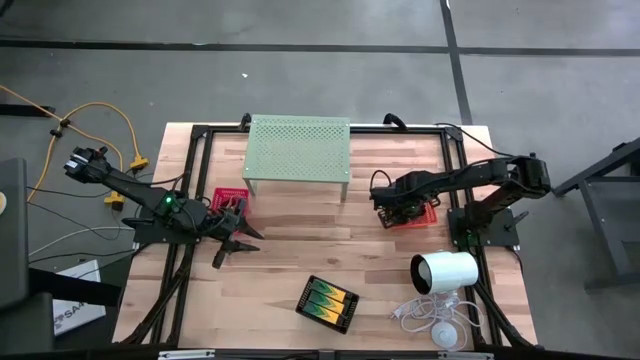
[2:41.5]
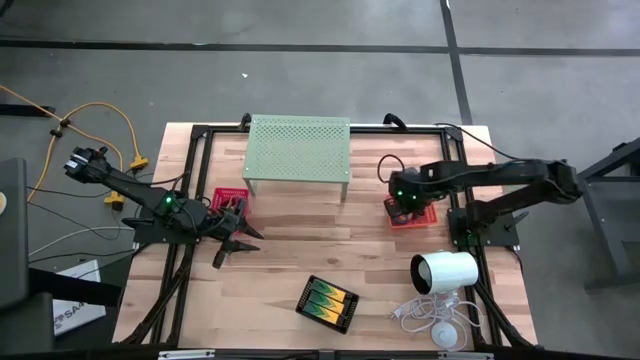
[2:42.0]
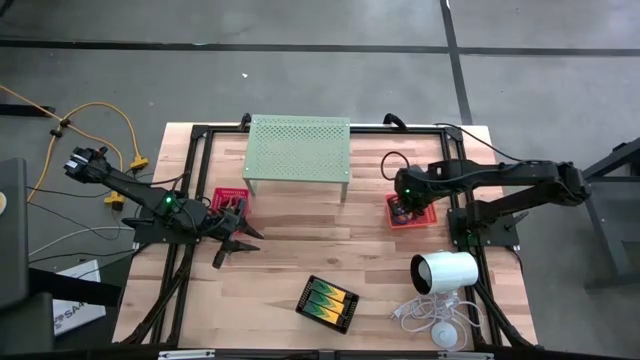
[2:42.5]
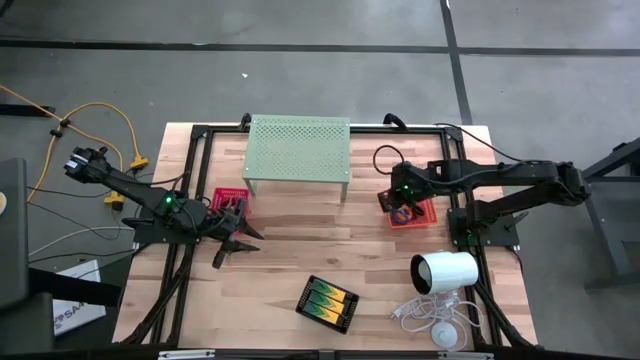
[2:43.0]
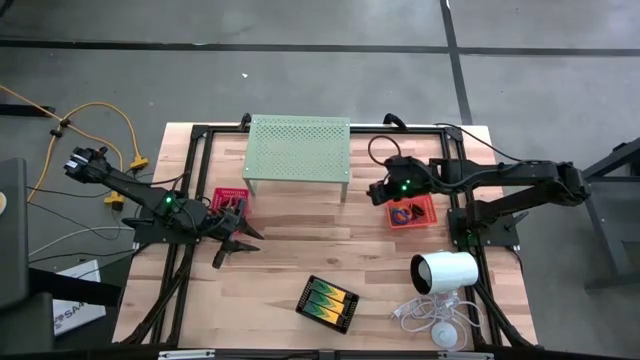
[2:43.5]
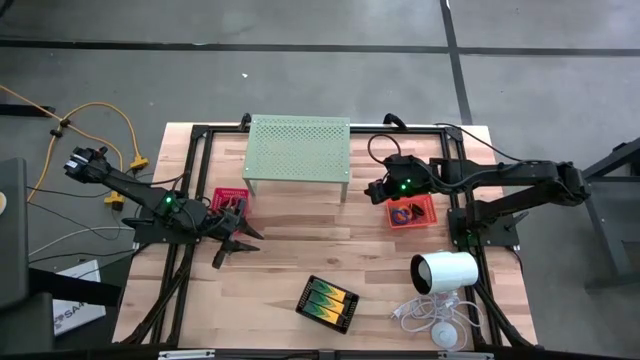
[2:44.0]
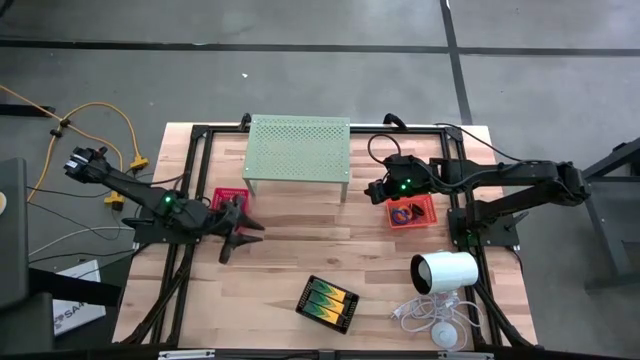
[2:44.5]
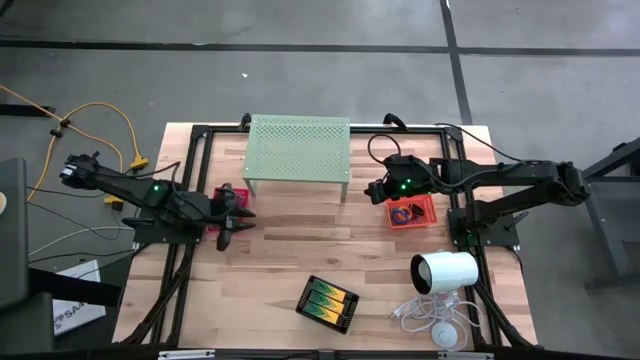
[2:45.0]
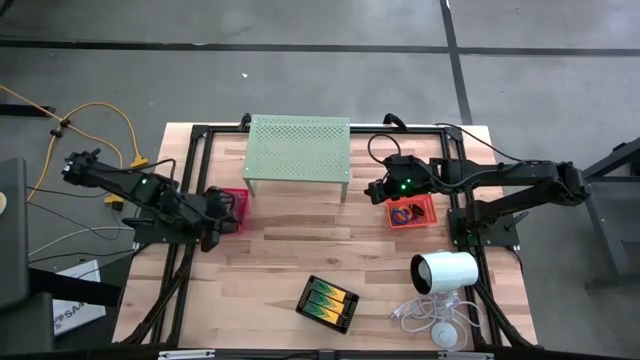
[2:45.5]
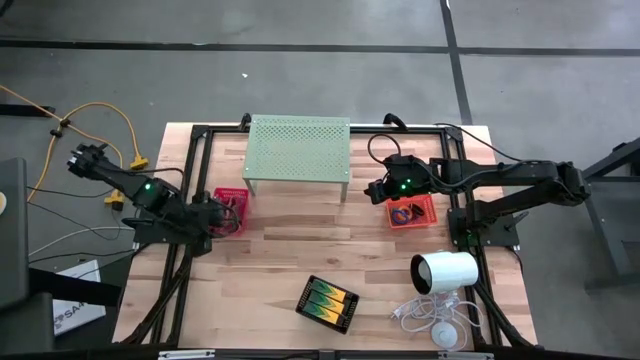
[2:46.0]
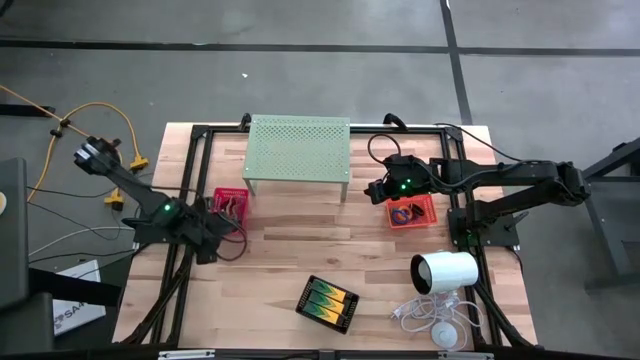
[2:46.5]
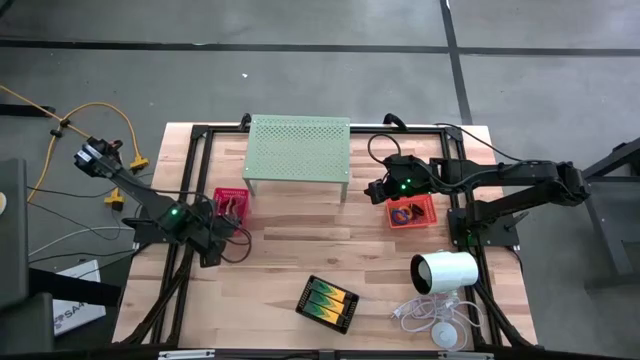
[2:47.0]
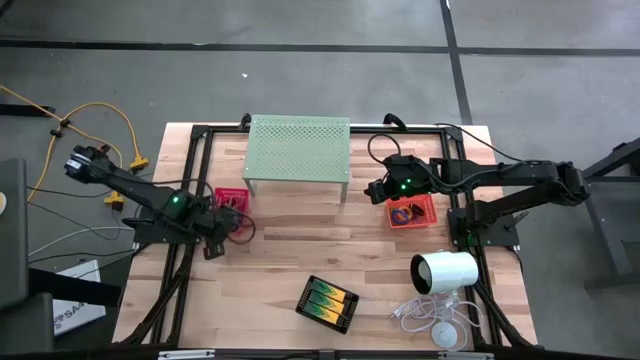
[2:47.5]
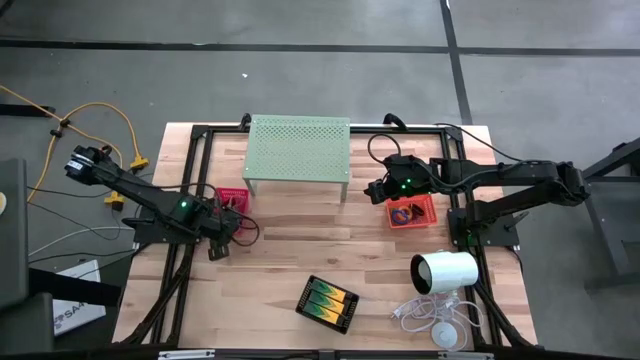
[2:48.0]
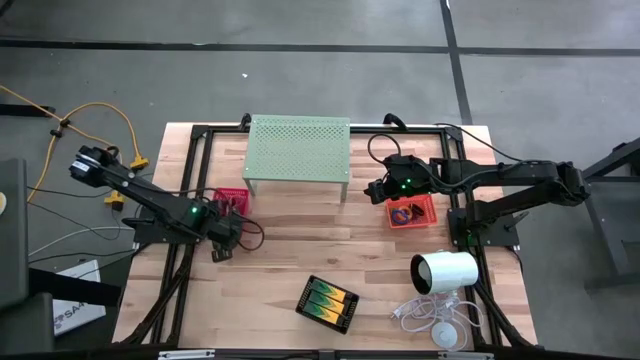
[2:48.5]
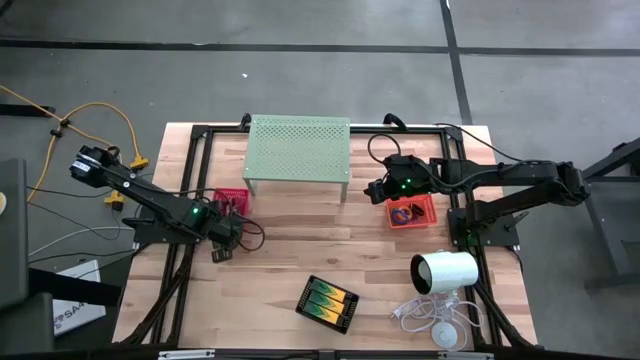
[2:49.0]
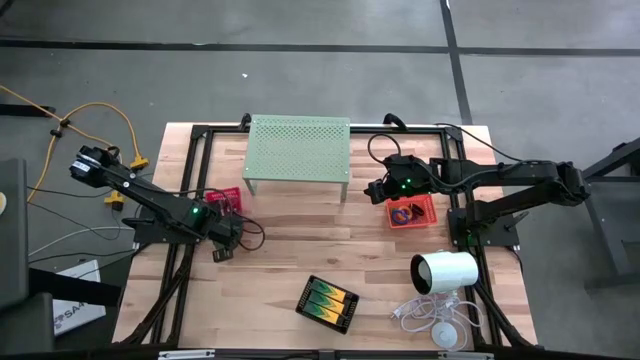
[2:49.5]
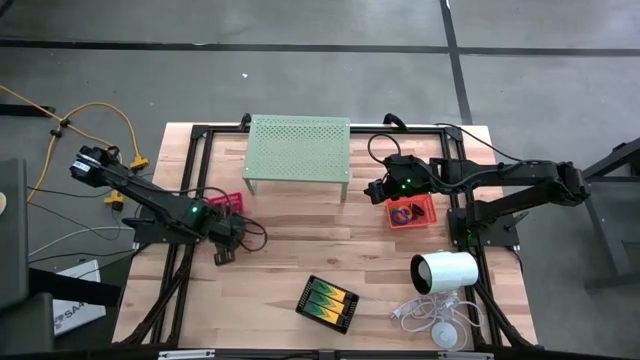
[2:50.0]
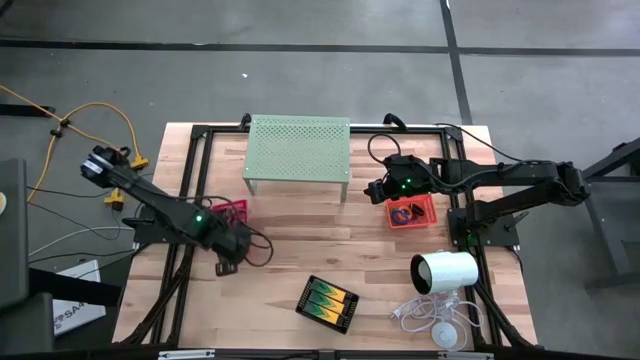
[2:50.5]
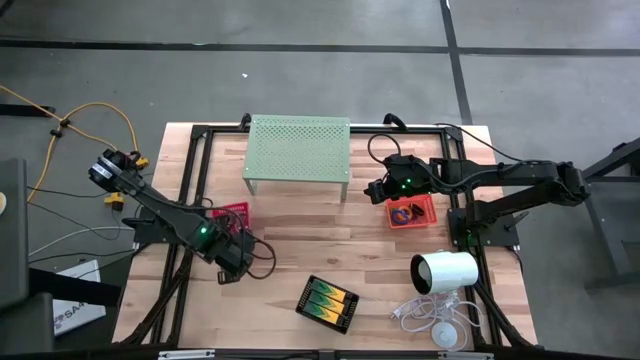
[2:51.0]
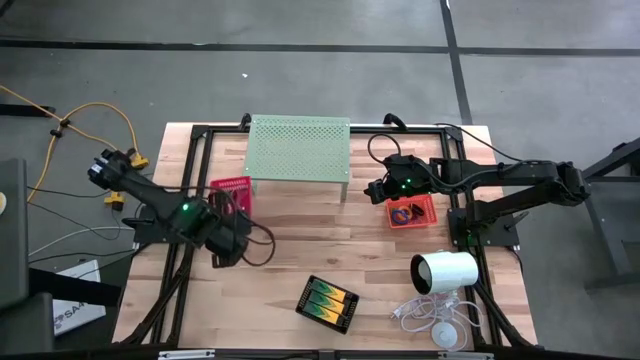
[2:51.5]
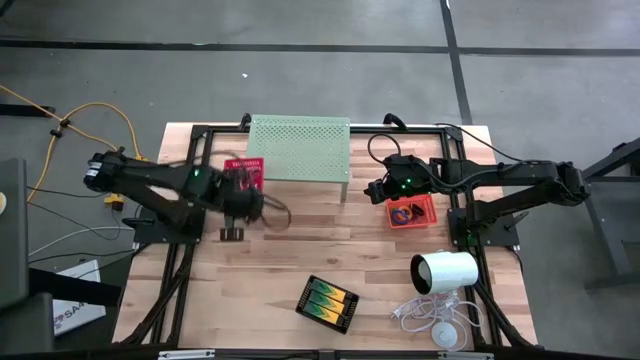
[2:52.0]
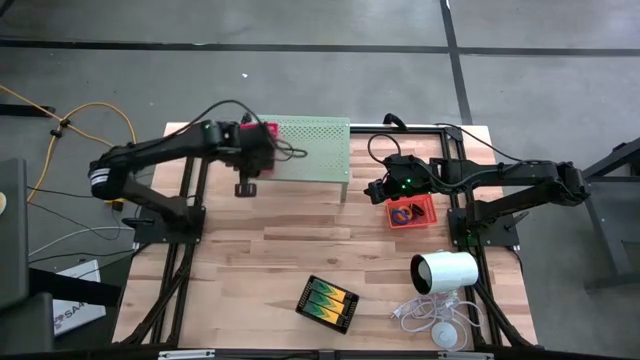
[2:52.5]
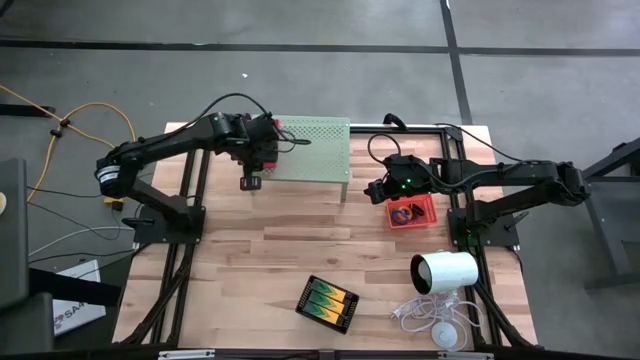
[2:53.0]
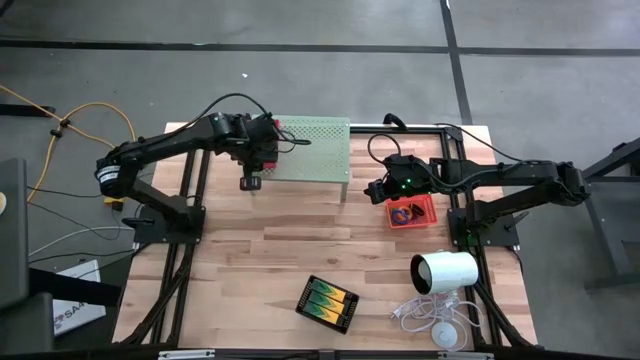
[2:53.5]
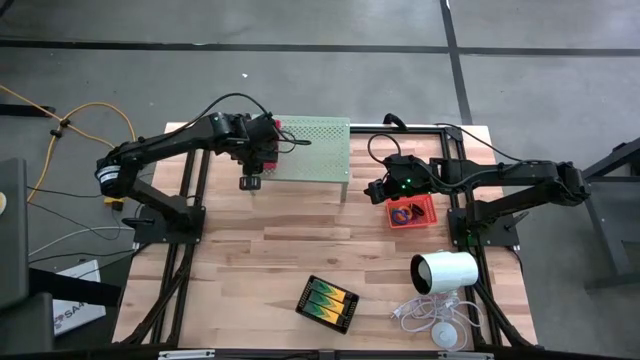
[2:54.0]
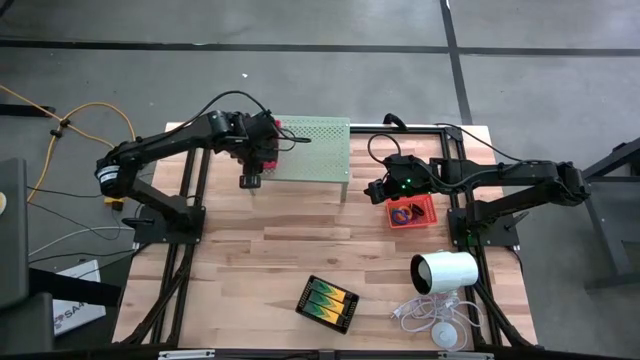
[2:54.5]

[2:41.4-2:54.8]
Task: Pick & Place Office Desk Supplies
Put the red bin on the shelf

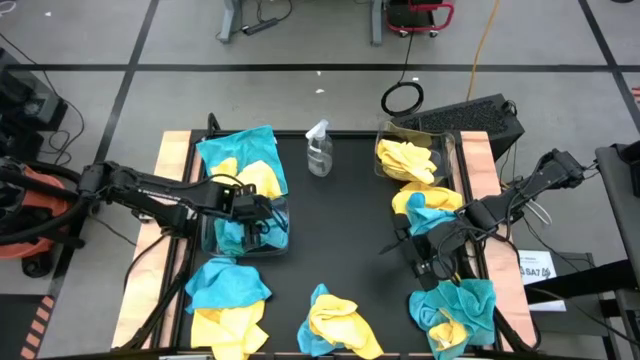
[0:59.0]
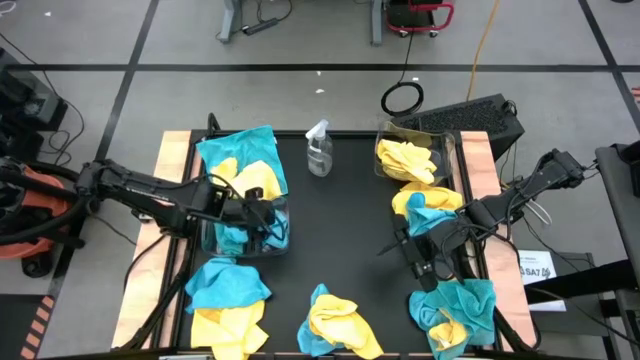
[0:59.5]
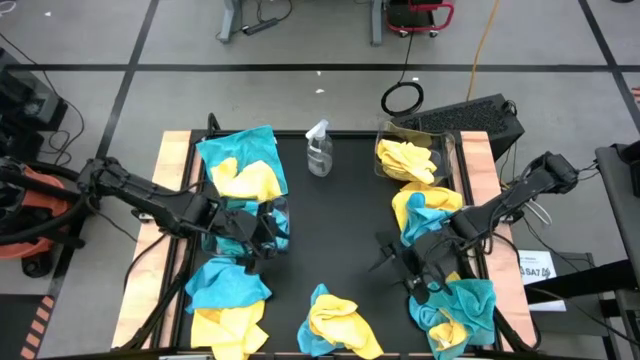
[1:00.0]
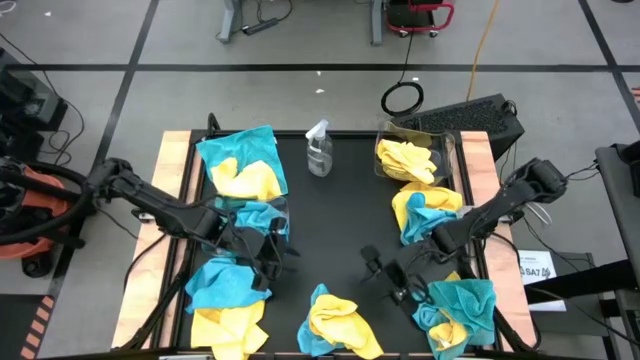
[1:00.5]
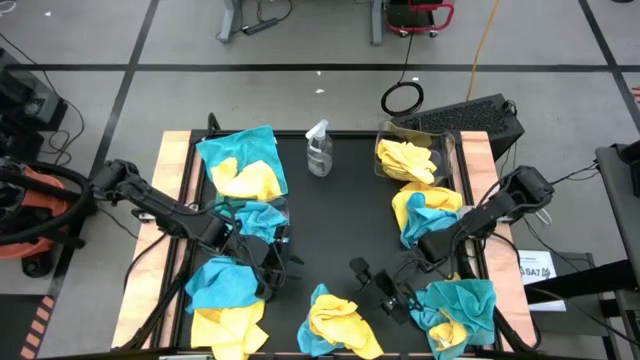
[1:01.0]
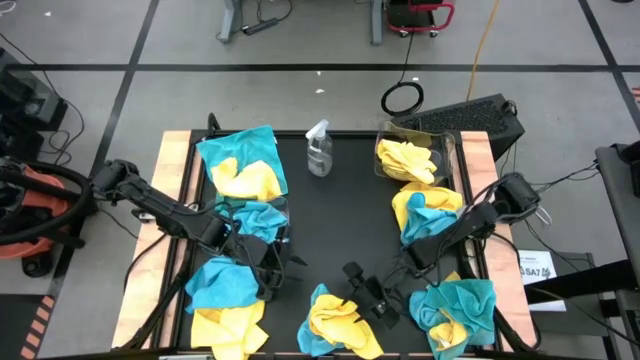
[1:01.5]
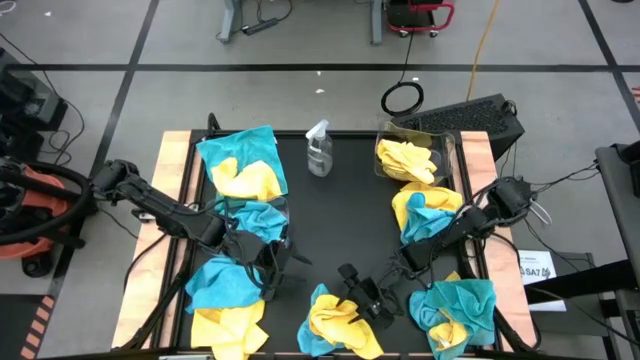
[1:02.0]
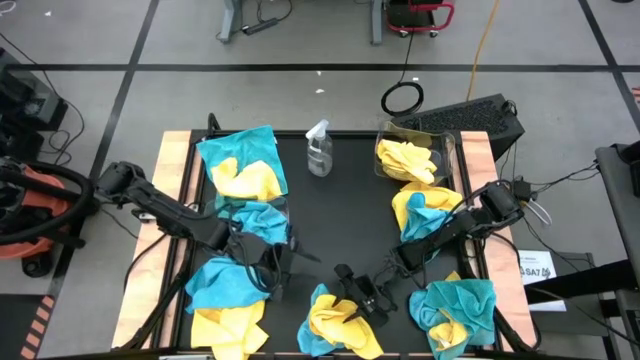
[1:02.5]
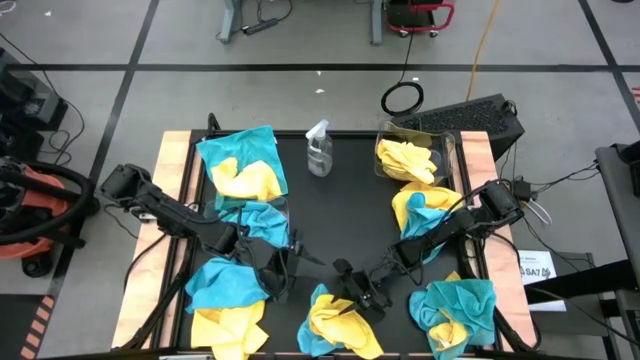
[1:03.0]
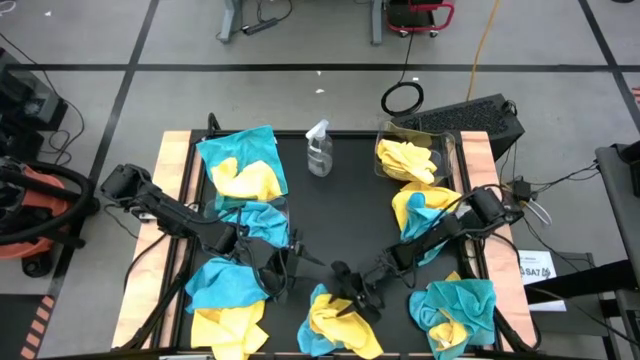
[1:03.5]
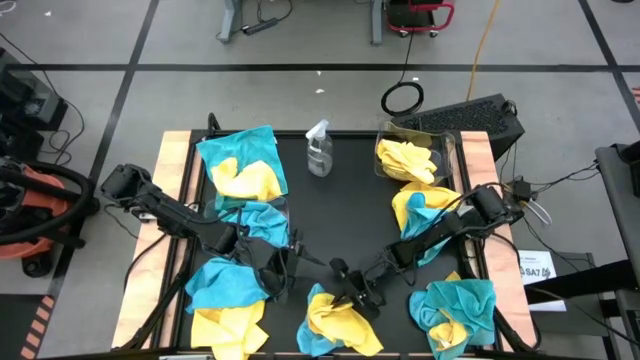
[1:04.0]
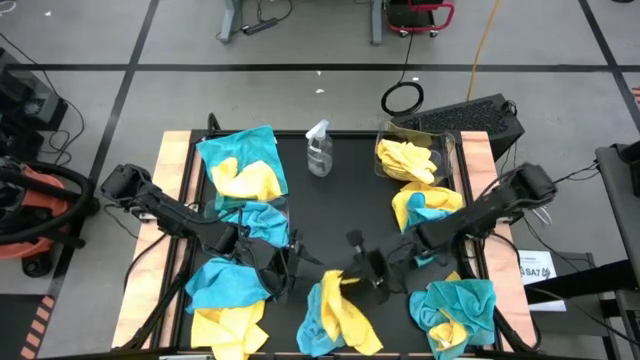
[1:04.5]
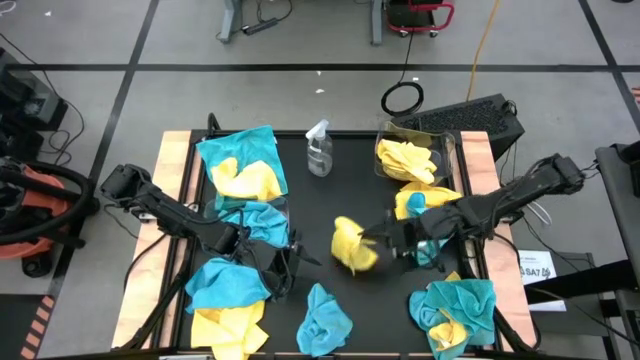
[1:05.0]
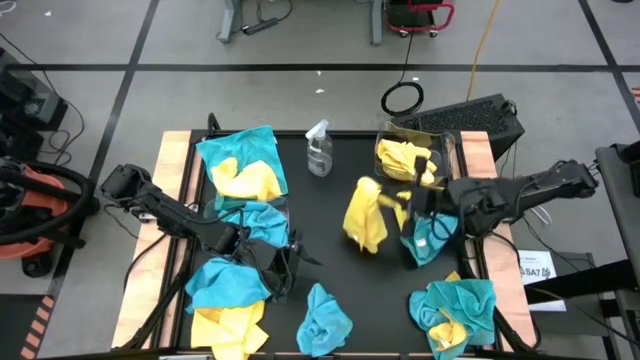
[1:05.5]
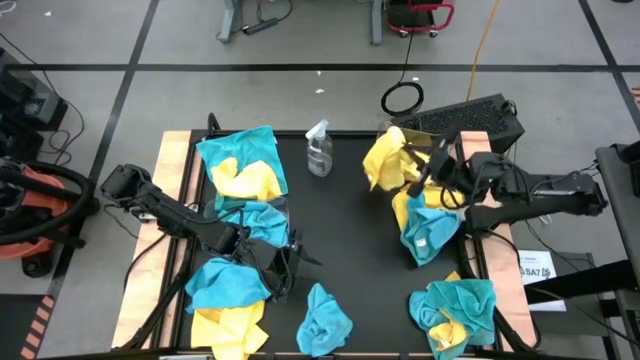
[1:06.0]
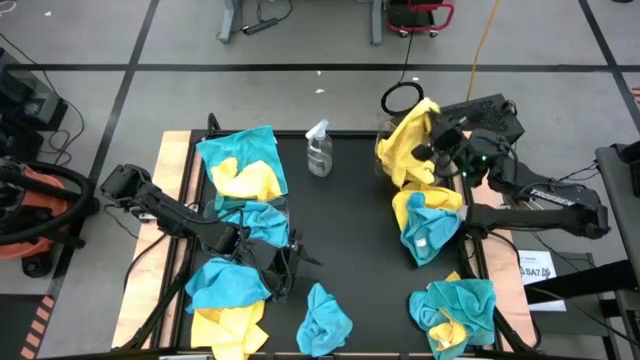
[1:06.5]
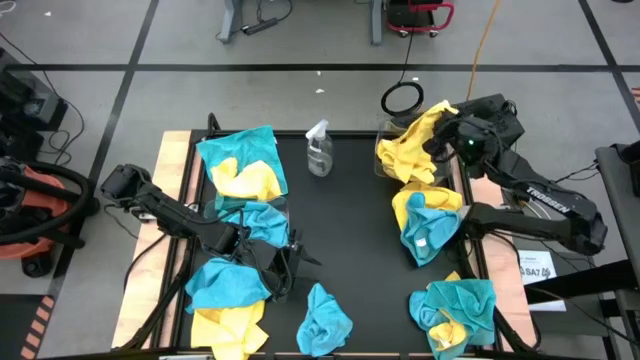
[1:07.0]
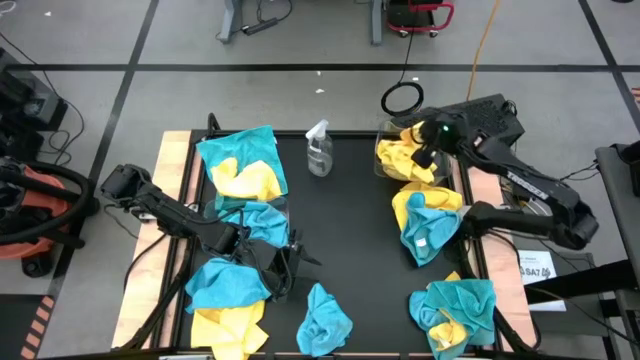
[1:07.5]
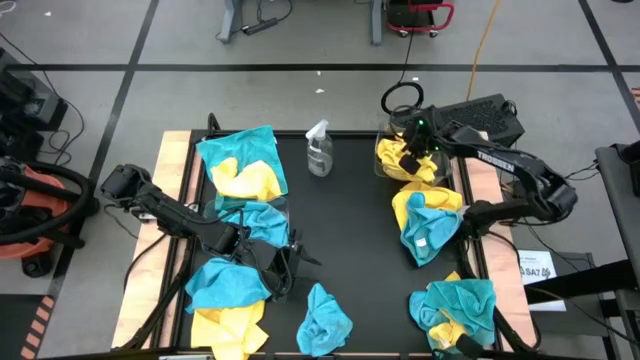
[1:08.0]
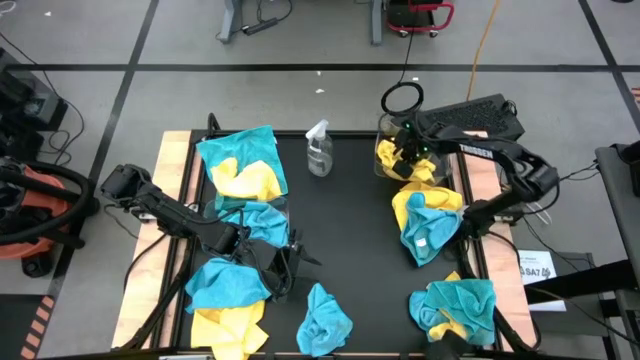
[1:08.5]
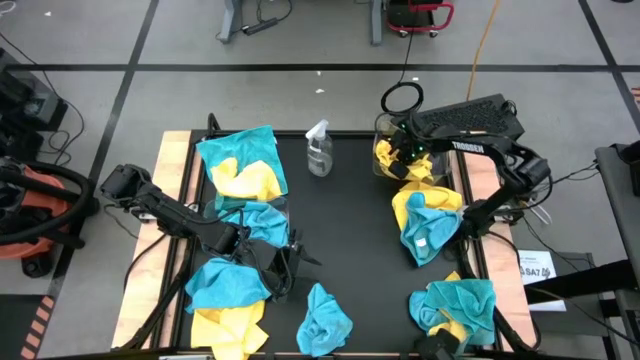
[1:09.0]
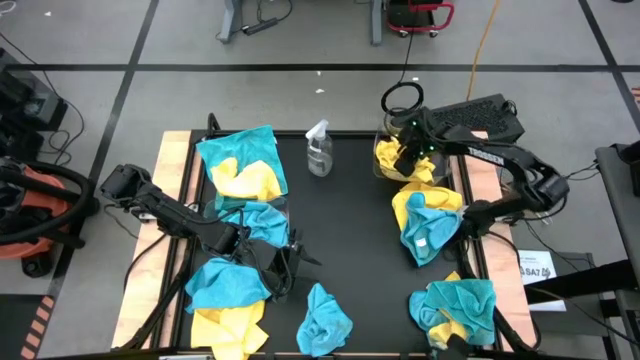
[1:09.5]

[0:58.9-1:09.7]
Task: Sort microfiber towel by color & place in baskets
Put the yellow towel into the top transparent bin
